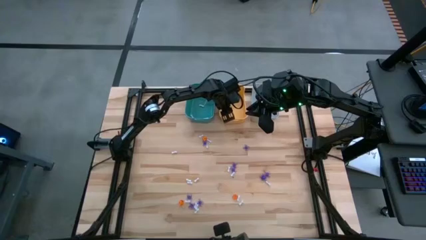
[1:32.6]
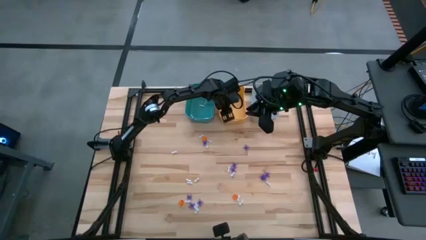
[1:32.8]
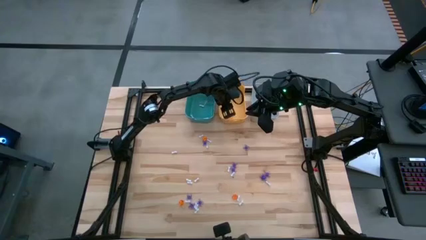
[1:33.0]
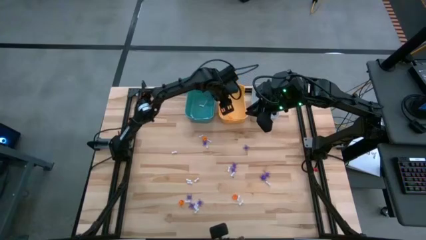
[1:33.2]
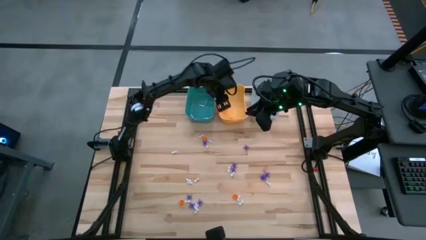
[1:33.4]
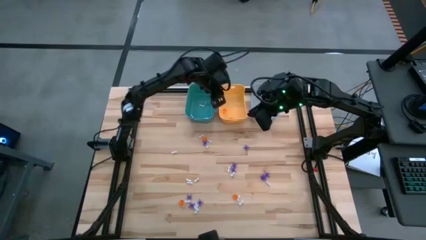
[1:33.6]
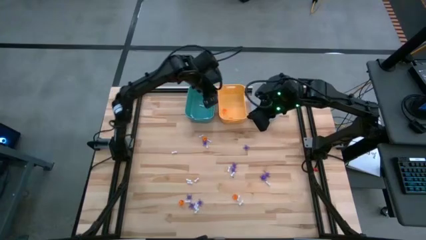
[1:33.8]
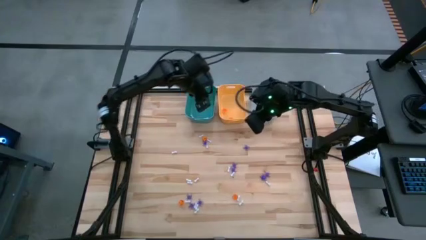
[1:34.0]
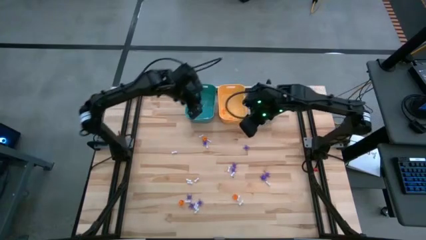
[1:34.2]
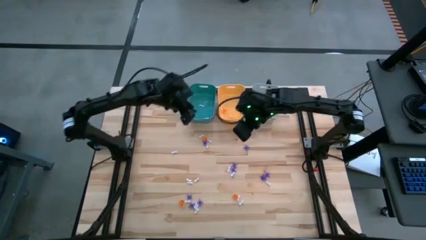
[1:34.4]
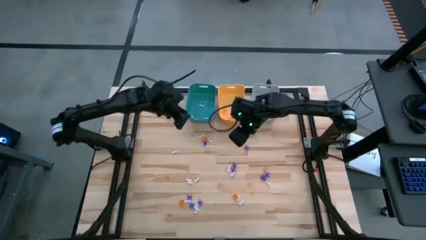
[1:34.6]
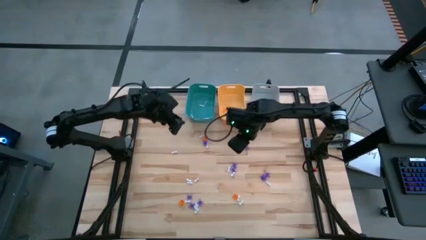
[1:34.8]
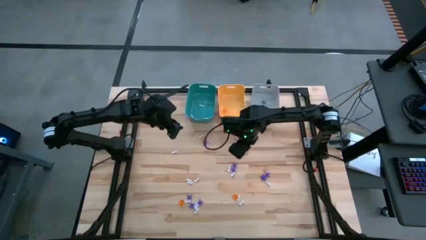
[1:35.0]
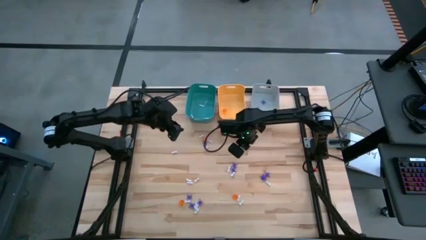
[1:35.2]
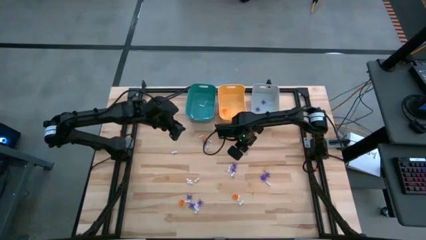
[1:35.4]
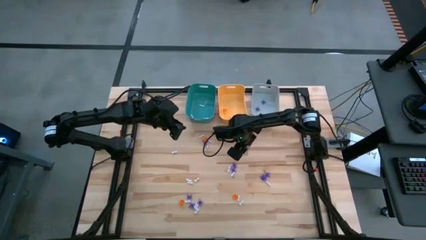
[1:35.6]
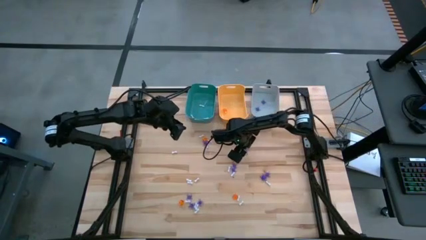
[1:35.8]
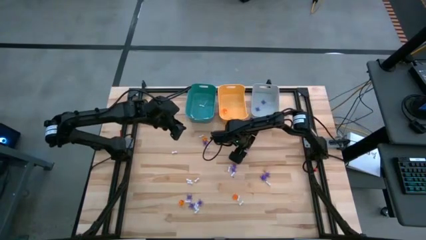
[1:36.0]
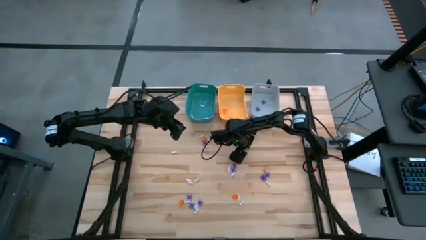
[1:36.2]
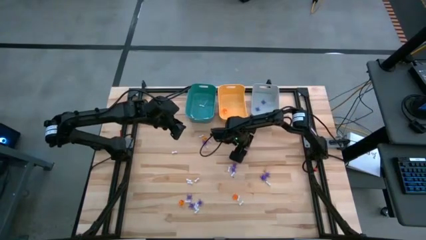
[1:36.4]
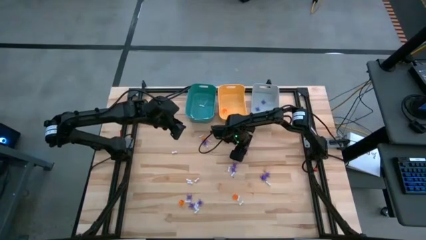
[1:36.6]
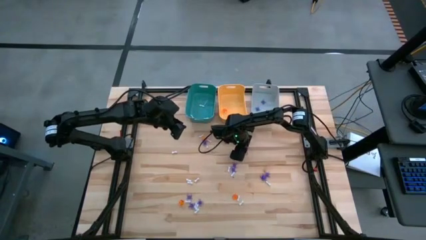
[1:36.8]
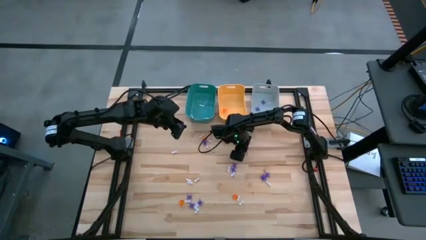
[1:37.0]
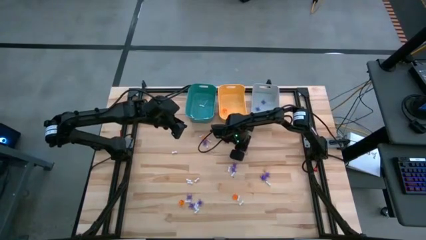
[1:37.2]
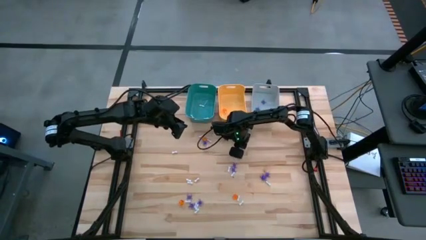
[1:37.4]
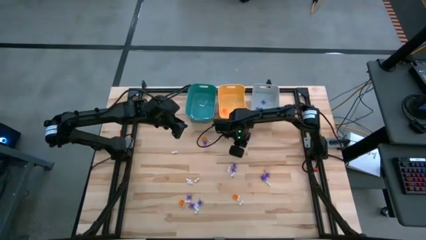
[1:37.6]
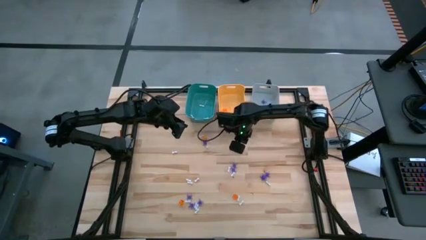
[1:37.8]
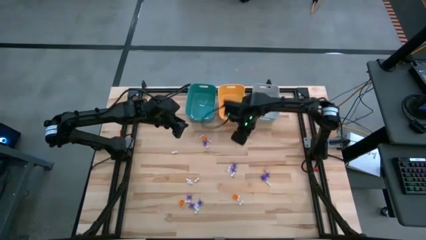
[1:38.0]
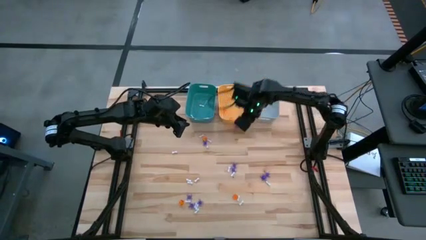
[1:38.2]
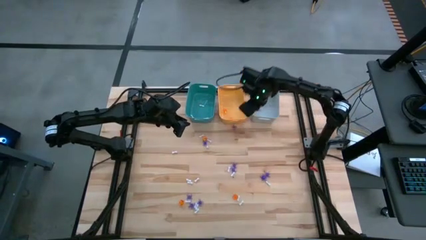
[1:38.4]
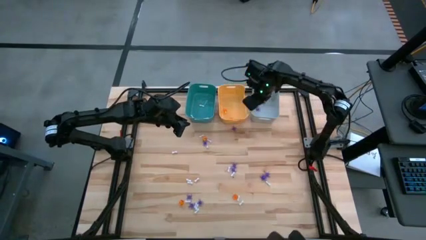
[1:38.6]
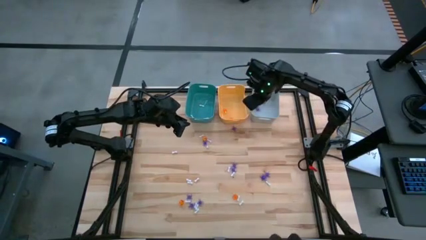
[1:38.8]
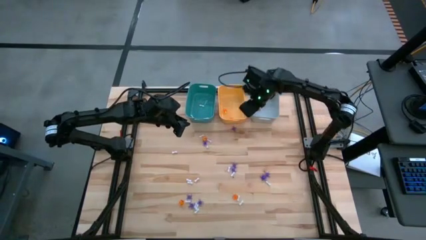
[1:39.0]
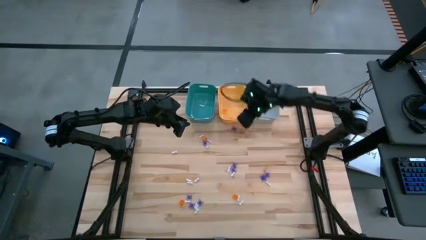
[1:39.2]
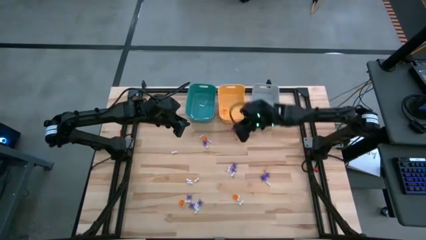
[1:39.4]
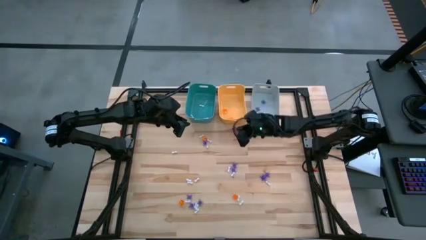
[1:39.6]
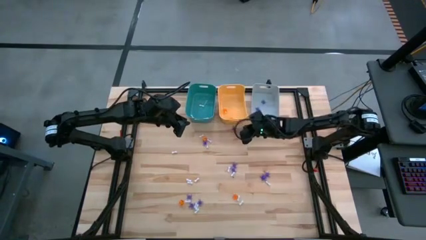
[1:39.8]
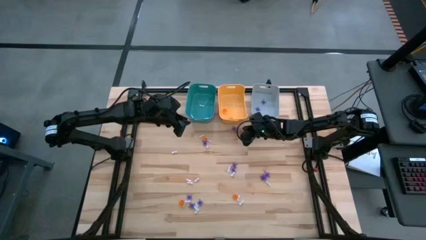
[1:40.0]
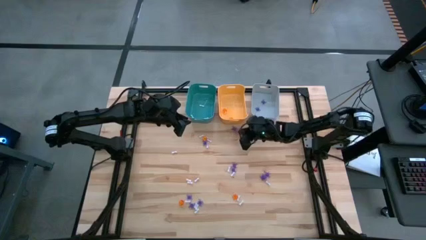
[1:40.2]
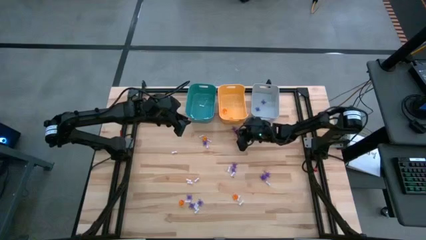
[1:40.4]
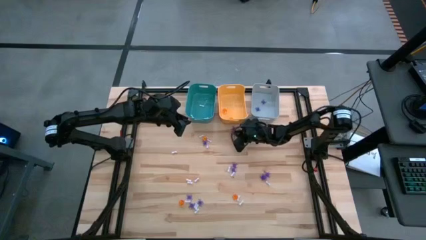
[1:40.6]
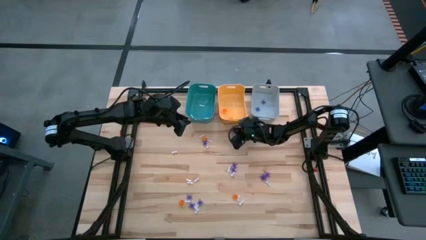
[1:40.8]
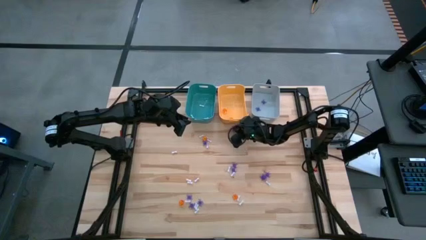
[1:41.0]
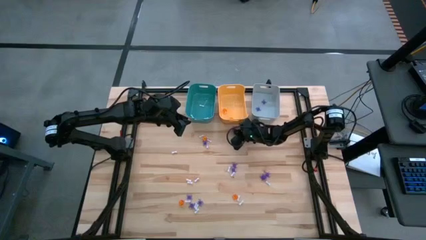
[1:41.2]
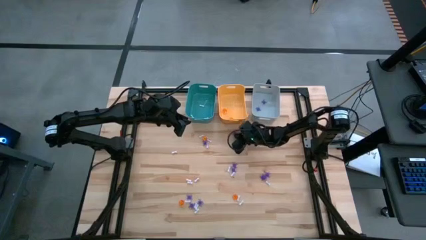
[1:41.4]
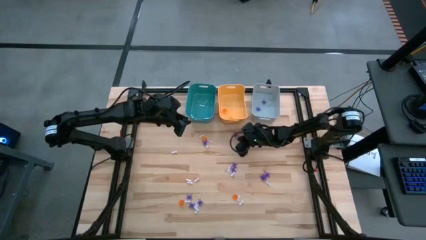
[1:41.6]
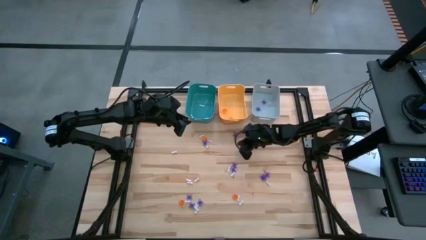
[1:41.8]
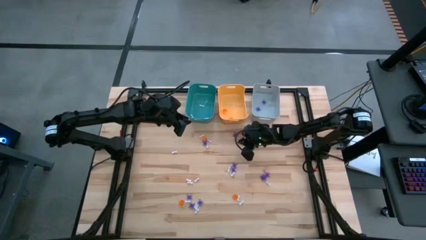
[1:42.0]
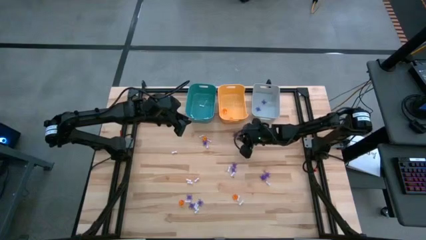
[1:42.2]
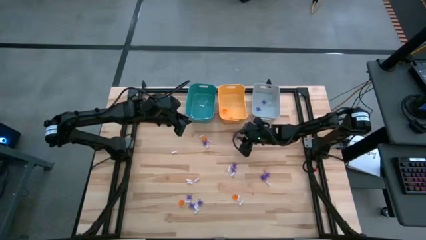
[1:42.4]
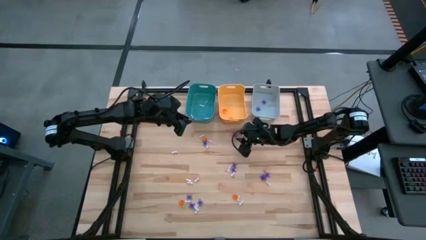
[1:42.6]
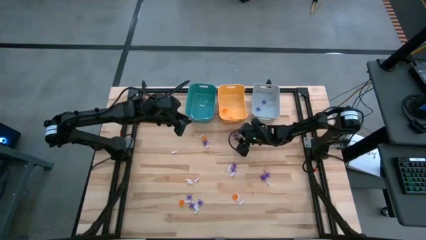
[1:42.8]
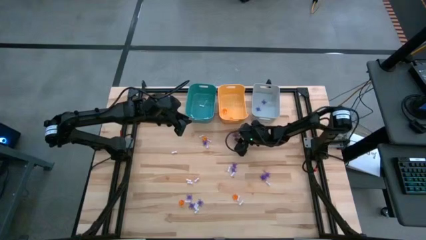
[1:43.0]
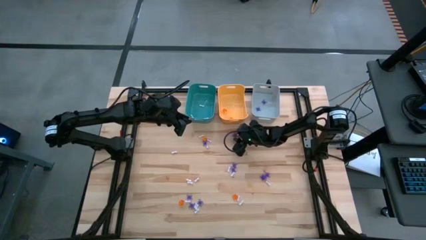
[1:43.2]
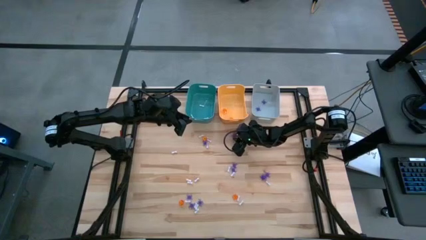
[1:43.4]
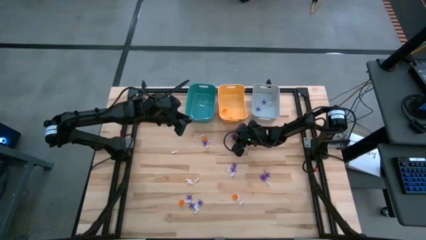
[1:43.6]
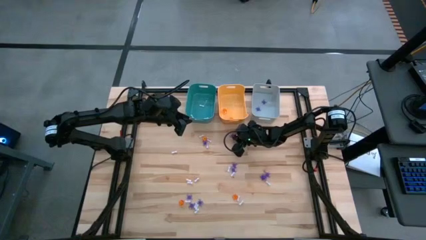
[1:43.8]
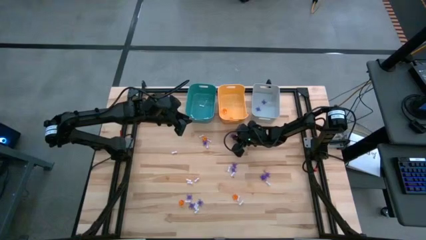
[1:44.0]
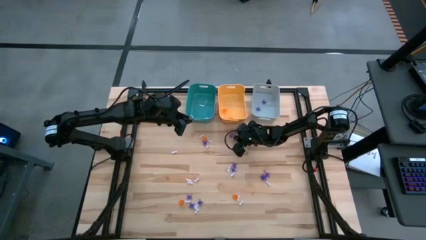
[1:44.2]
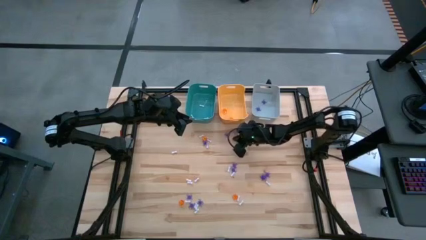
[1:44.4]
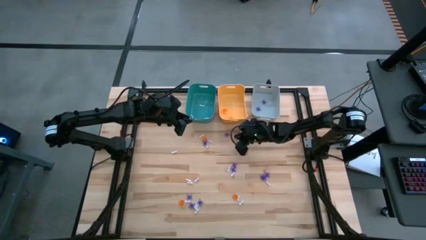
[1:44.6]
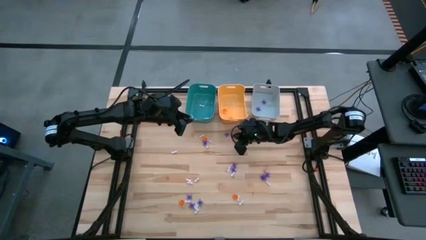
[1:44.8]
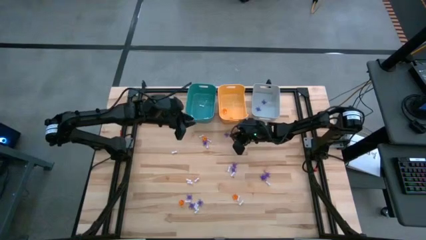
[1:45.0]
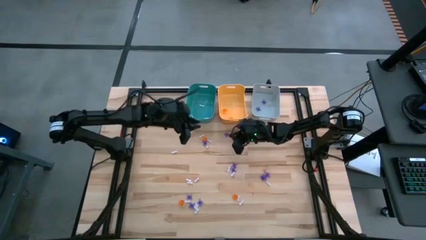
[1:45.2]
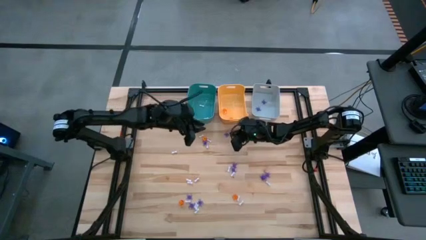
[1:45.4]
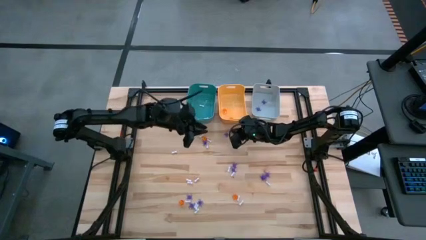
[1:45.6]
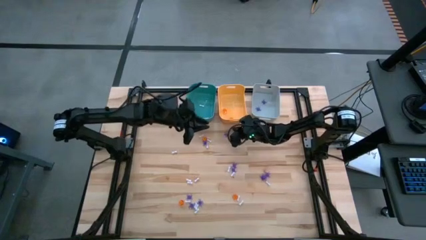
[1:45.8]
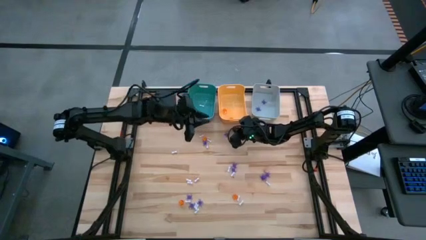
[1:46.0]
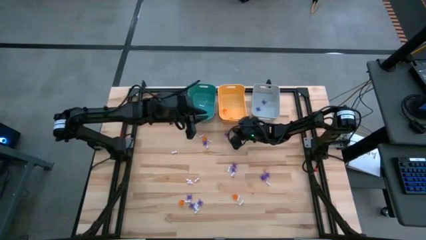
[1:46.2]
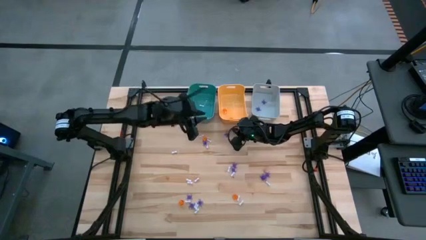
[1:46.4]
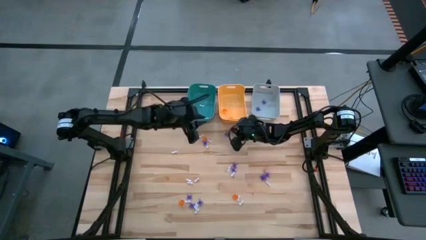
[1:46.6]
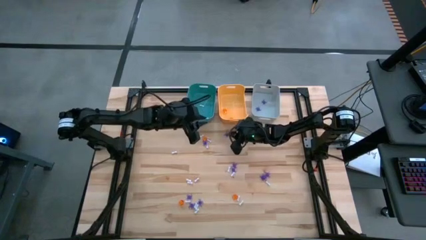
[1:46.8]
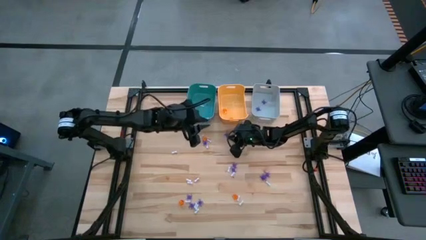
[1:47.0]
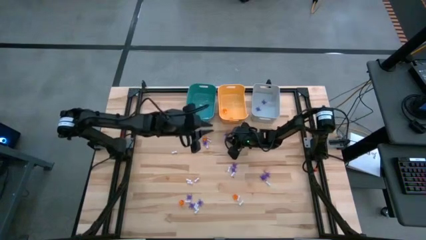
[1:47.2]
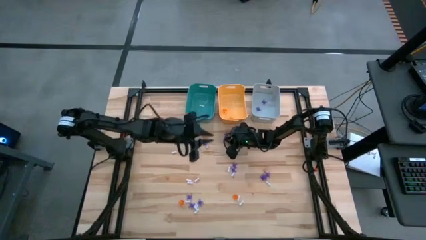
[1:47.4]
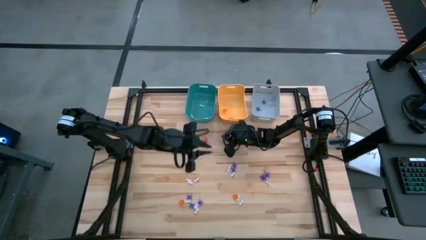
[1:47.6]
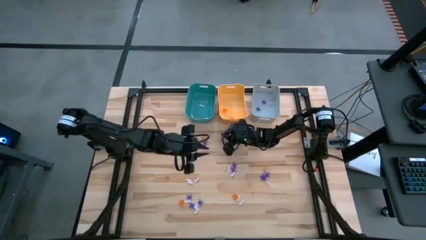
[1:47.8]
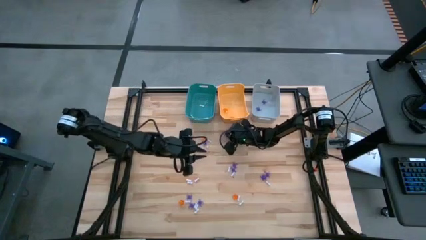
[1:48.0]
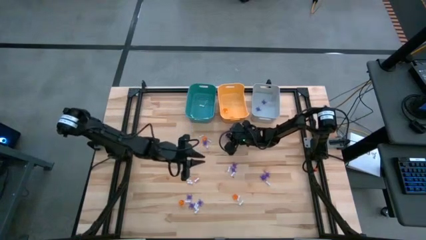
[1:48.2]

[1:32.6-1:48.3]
Task: Sort Halloween decoration
Put the purple spider toy into the gray bin
